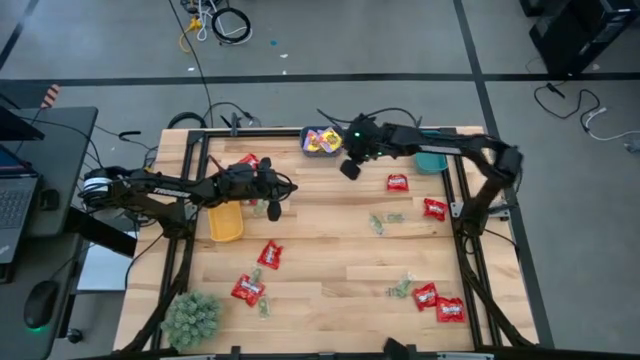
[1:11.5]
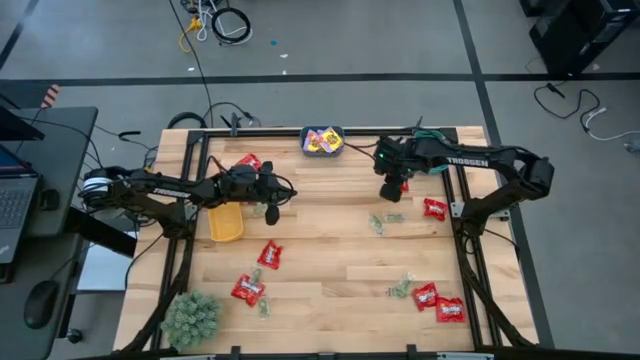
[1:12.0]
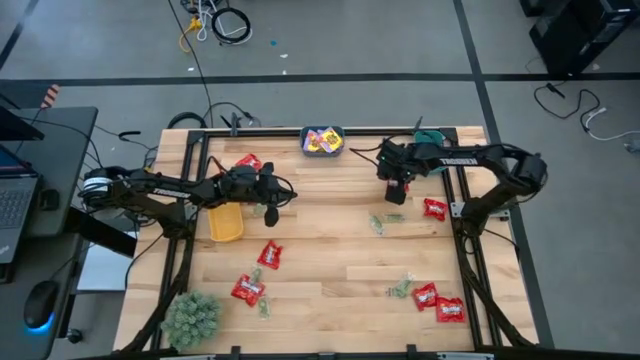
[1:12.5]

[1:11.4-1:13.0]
Task: Sort candy
Put the red candy into the green bin

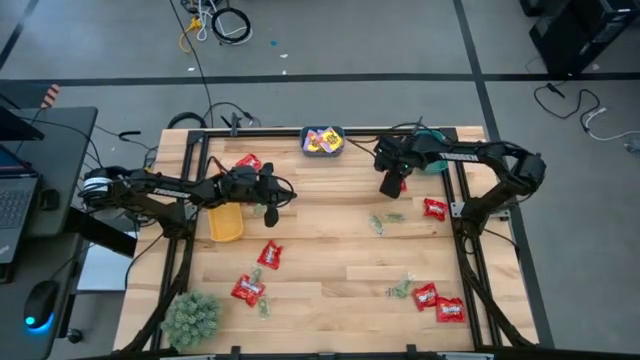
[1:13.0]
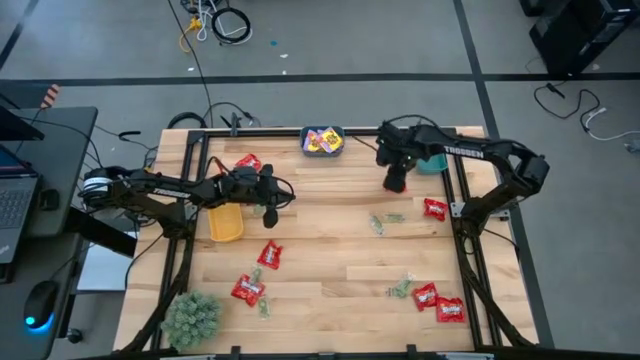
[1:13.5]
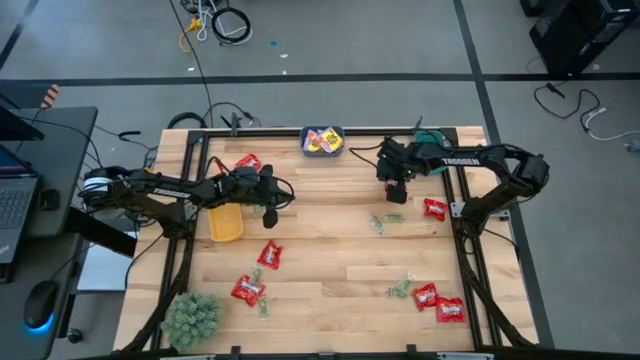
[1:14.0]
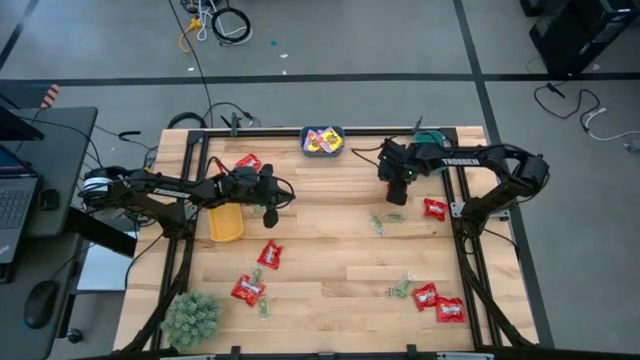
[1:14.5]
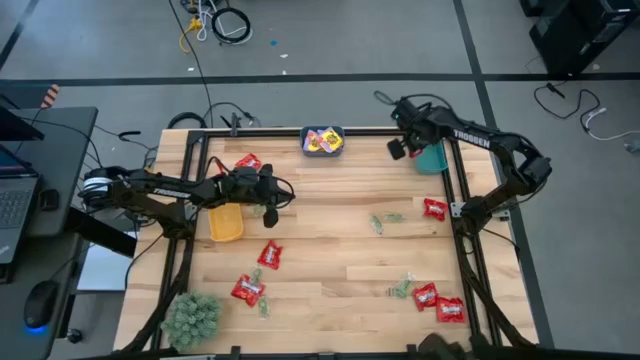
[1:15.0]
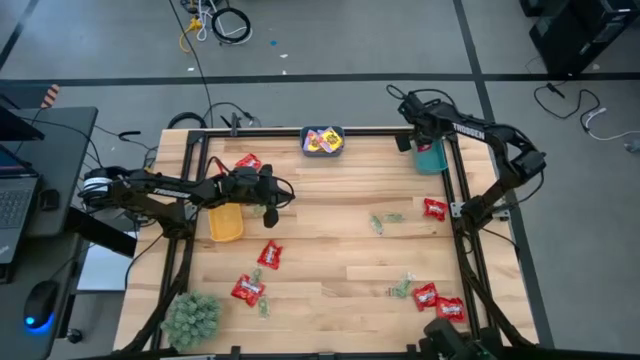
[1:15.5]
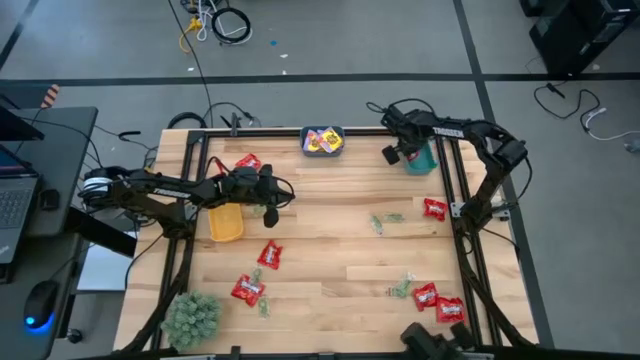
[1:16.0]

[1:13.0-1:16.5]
Put the red candy into the green bin

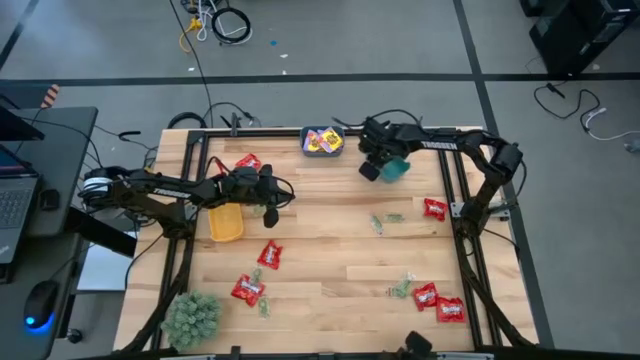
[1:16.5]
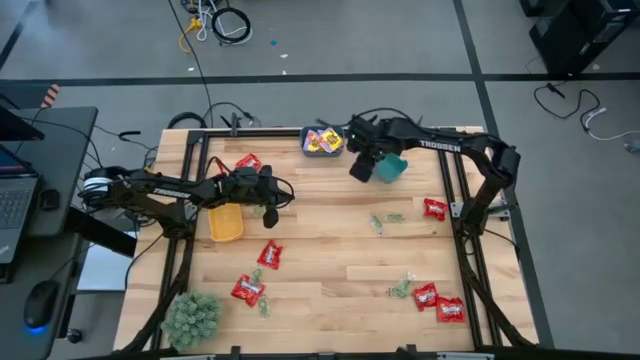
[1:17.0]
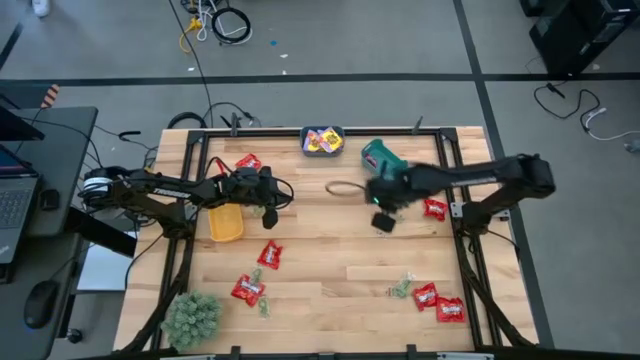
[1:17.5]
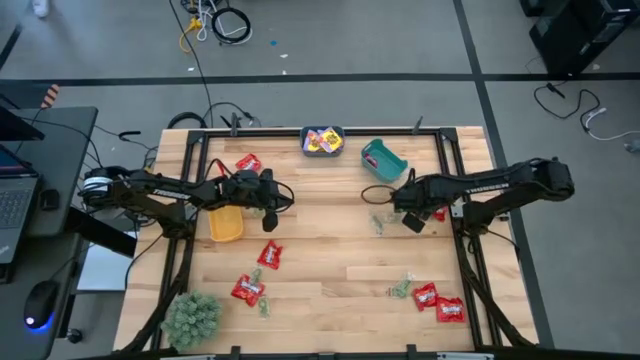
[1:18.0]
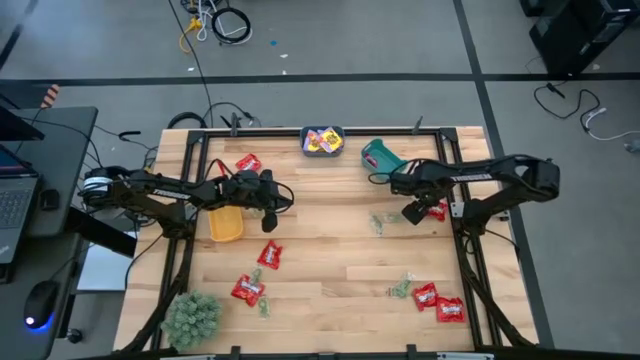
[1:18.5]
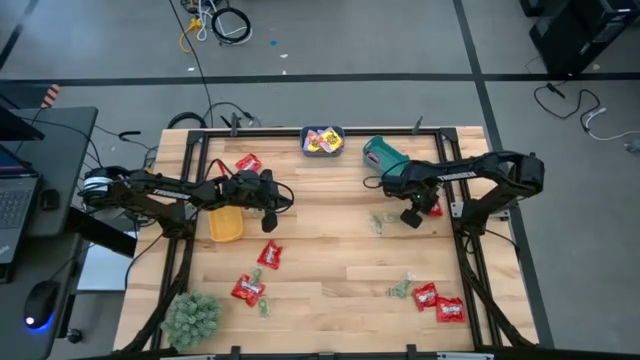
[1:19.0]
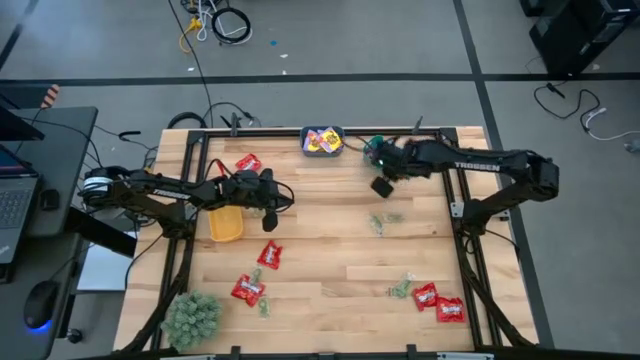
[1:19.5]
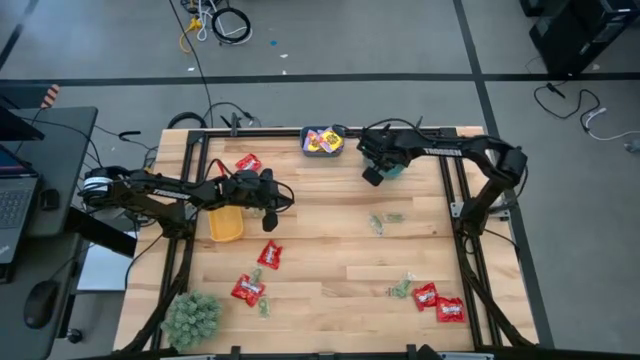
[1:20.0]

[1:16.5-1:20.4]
Put the red candy into the green bin

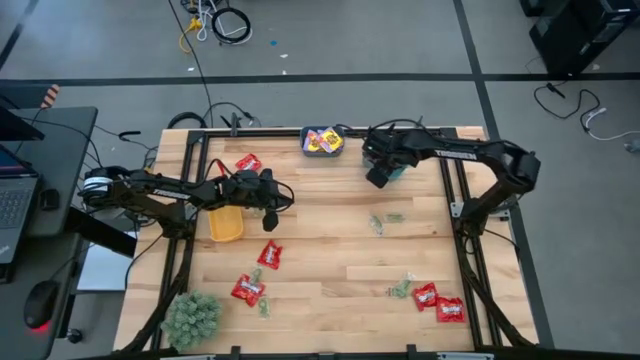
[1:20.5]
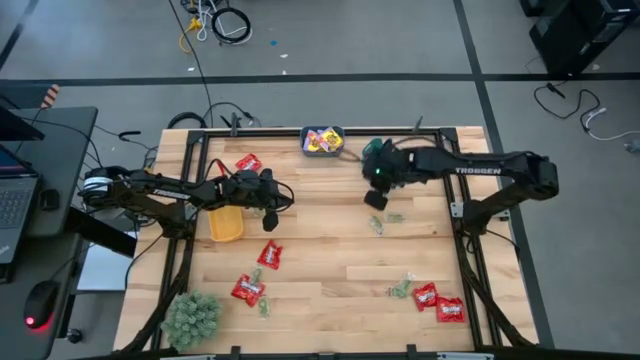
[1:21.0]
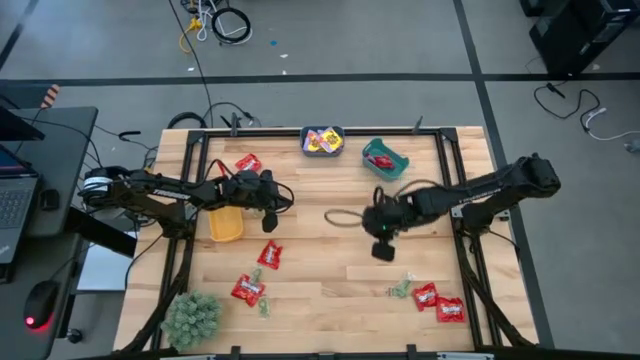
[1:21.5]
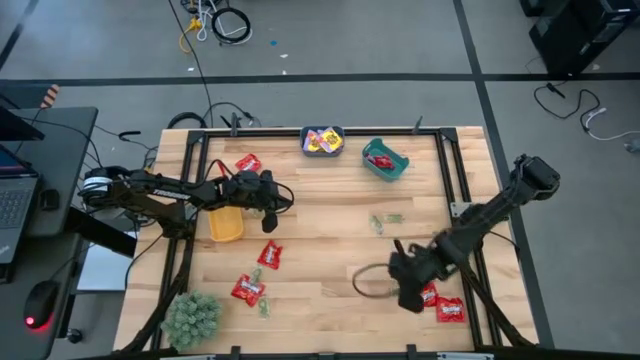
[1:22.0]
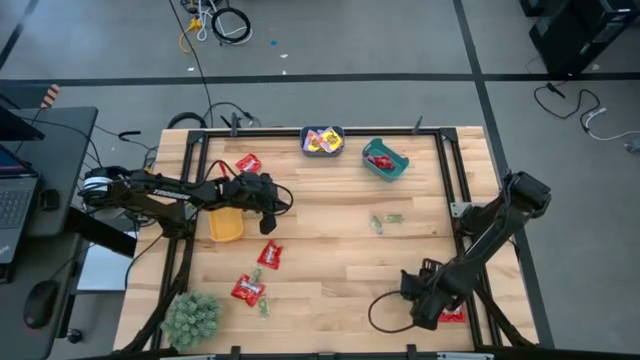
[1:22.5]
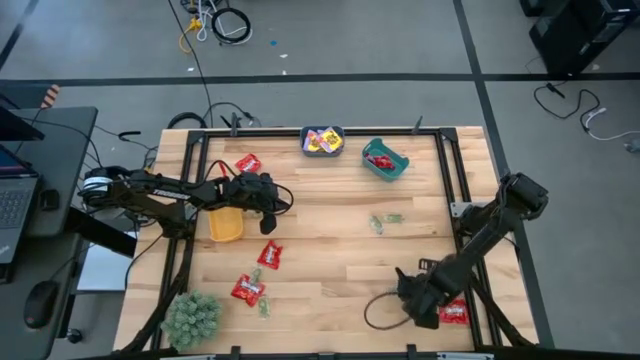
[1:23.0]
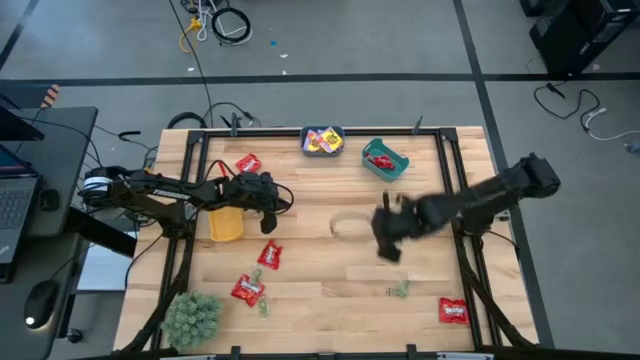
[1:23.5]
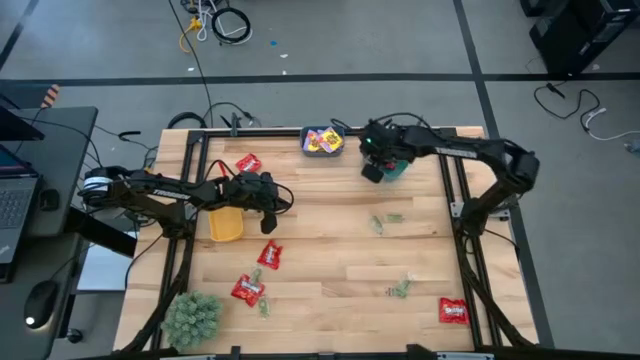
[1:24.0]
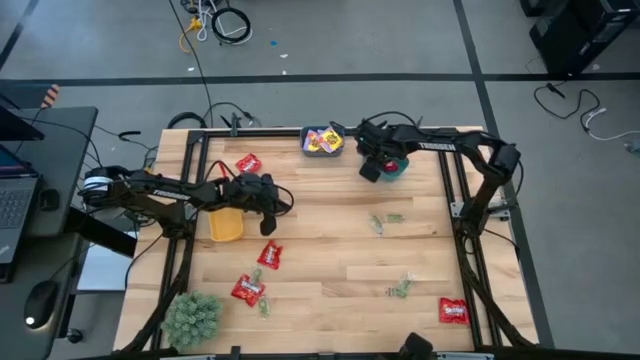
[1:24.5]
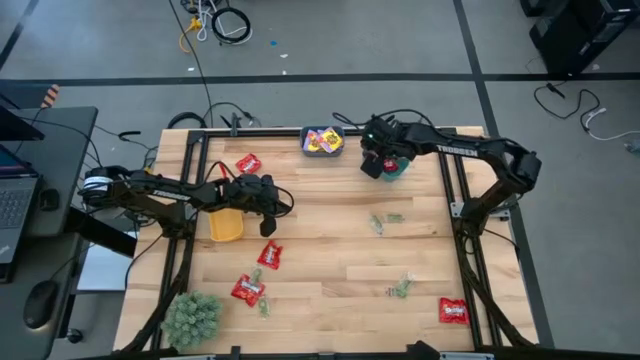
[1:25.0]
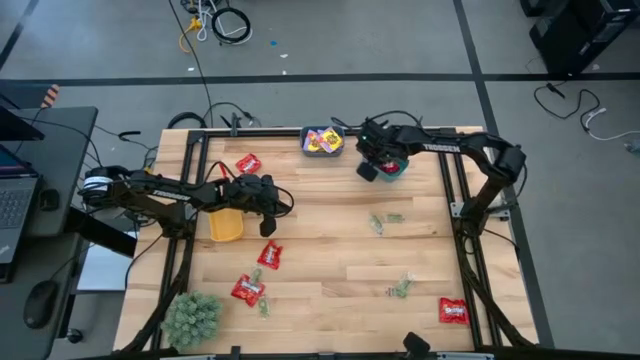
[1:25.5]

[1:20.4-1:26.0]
Put the red candy into the green bin

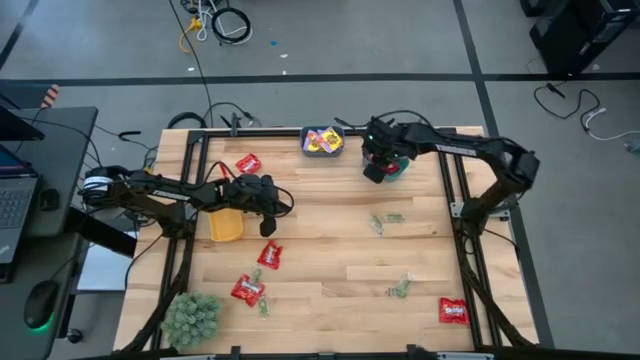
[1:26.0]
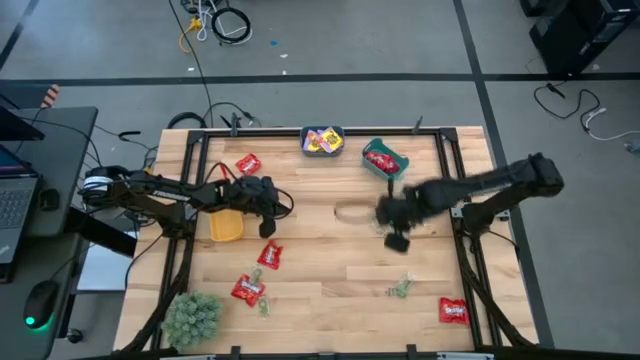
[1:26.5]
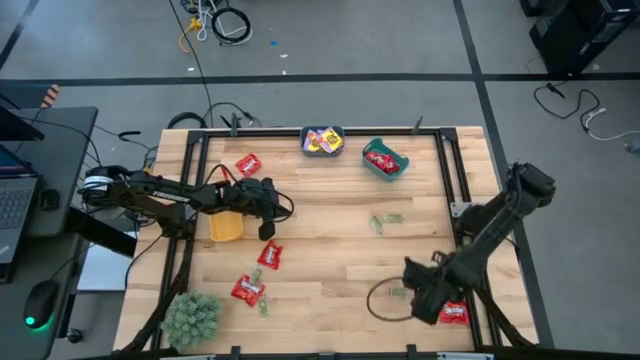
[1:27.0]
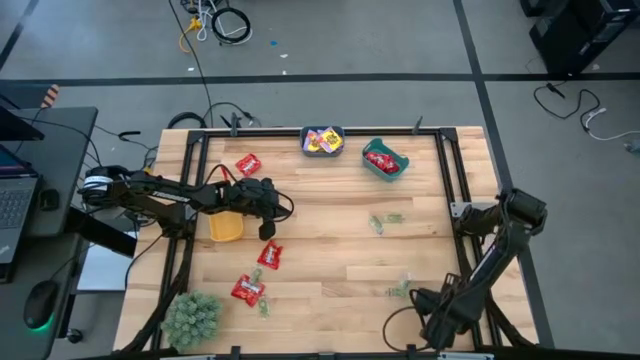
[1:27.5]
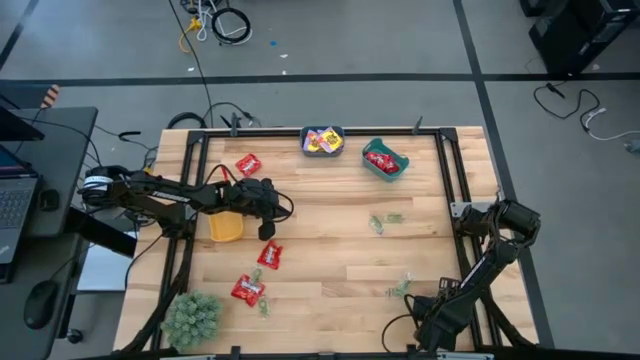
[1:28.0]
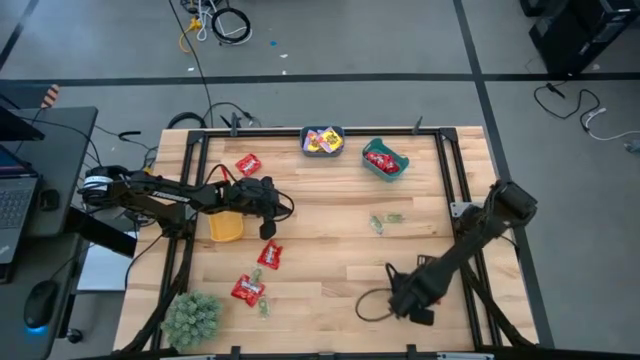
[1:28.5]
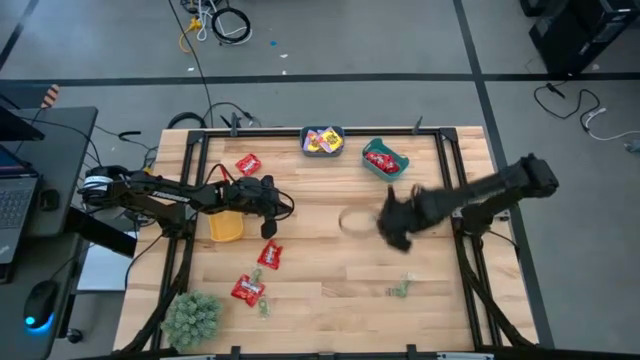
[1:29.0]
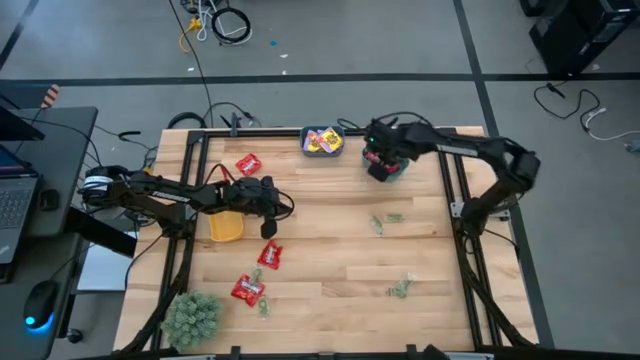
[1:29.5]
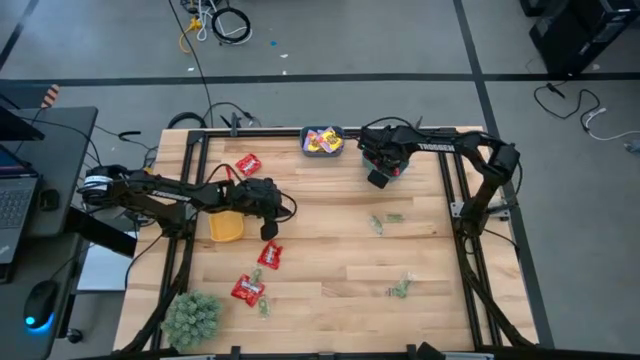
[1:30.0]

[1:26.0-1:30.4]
Put the red candy into the green bin

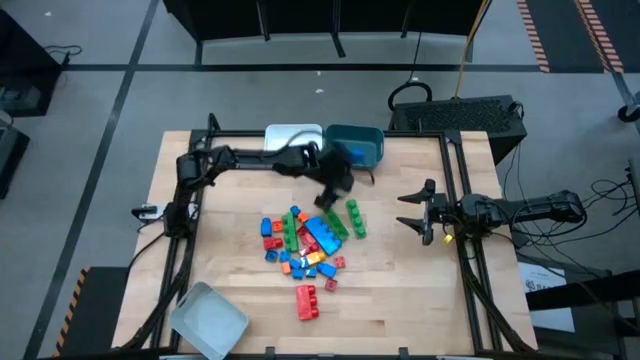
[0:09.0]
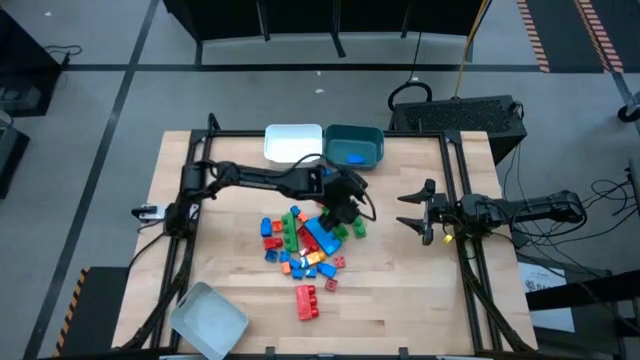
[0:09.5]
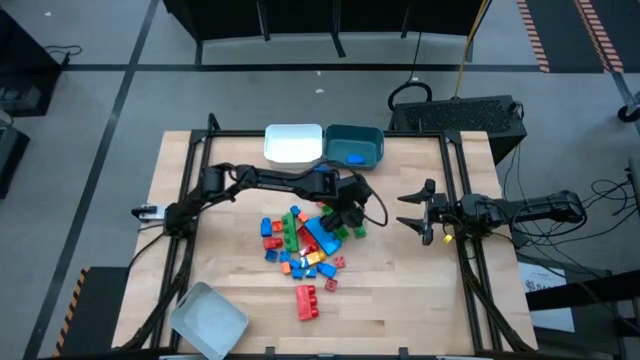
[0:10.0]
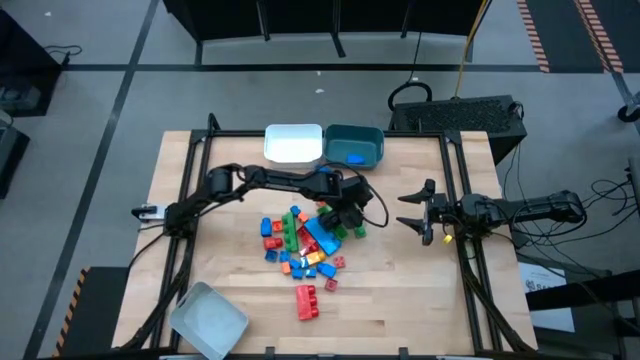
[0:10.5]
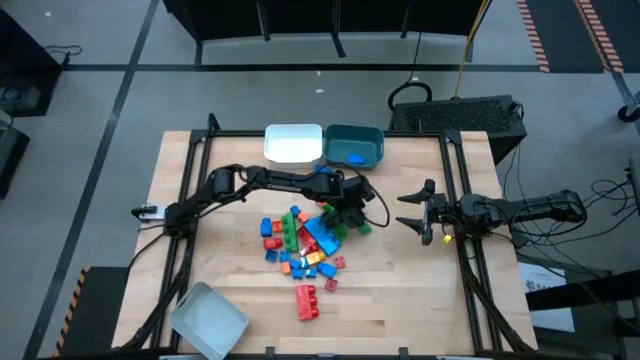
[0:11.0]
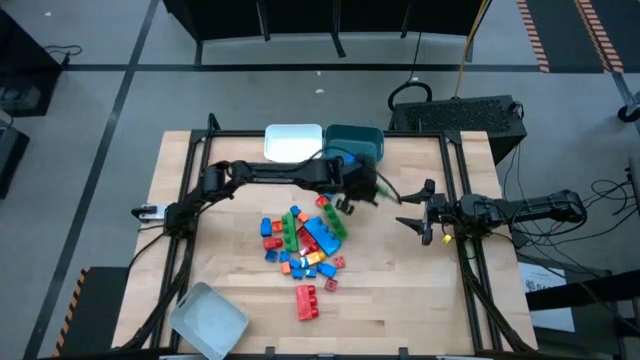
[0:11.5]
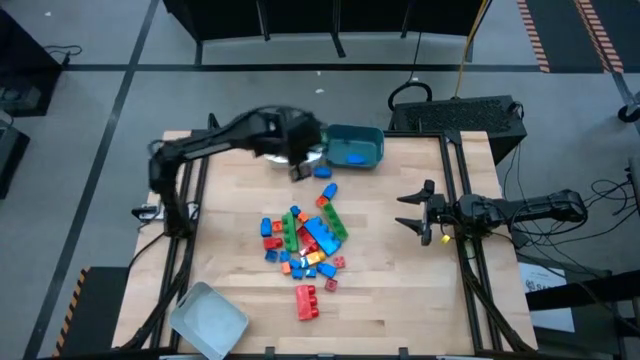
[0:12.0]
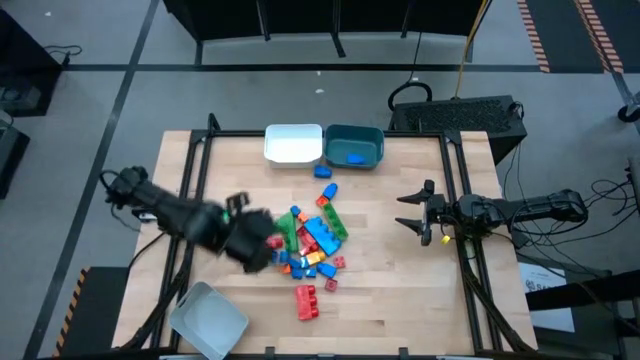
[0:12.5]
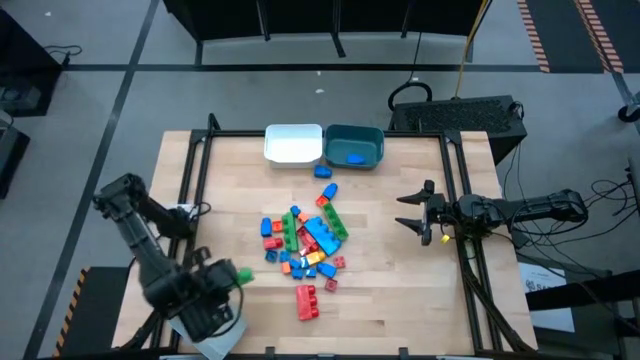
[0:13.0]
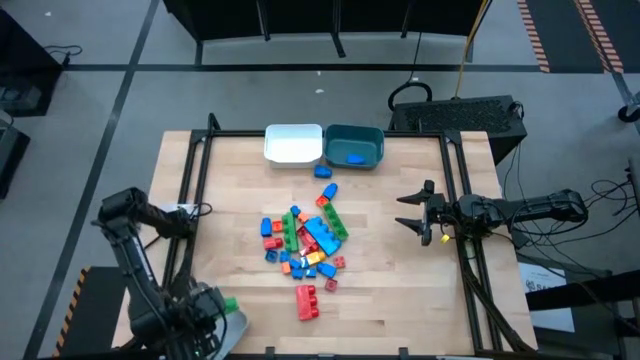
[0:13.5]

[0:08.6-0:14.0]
Task: Sort blocks by size
Put the green rectangular 4 stud game piece into the gray bin
